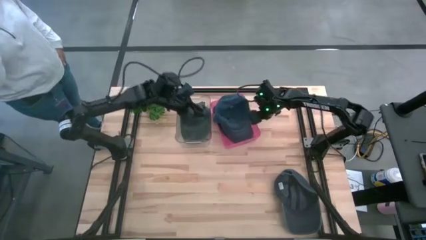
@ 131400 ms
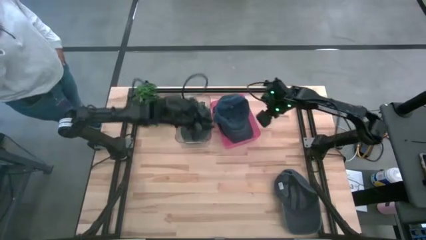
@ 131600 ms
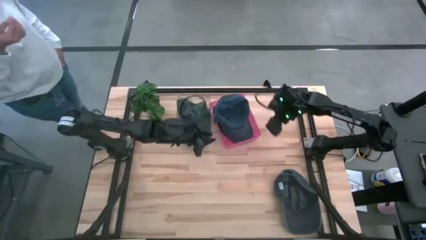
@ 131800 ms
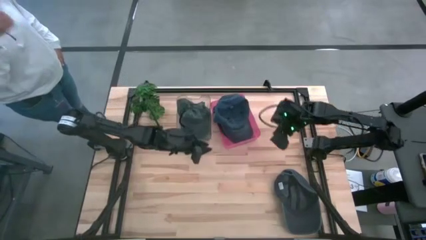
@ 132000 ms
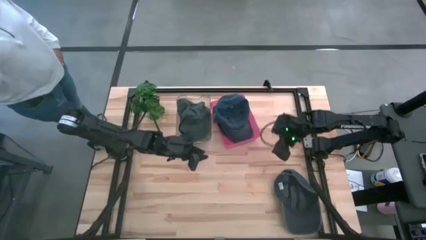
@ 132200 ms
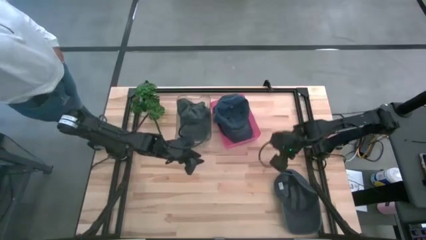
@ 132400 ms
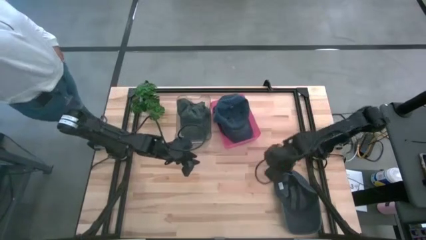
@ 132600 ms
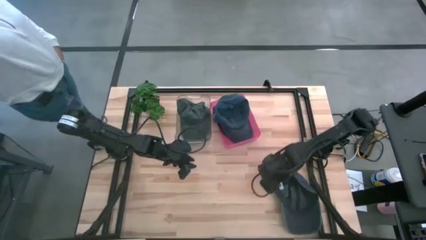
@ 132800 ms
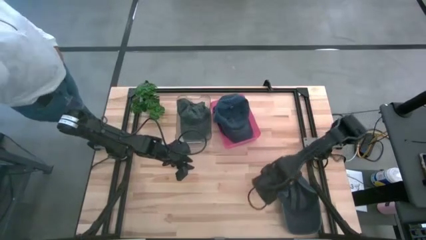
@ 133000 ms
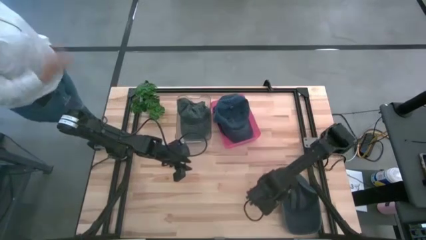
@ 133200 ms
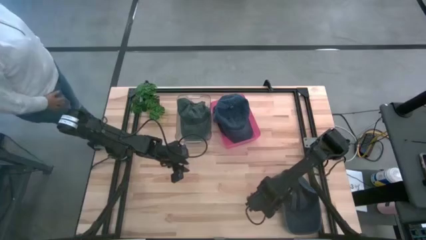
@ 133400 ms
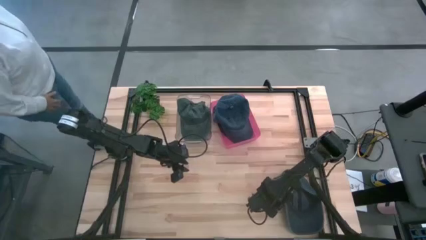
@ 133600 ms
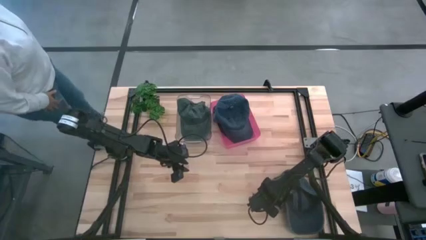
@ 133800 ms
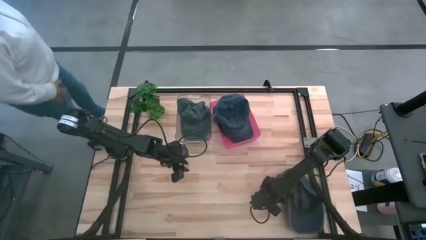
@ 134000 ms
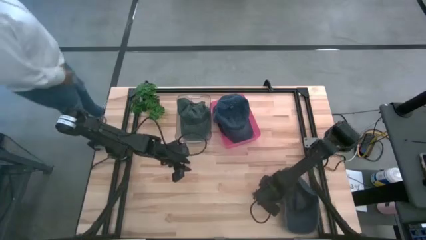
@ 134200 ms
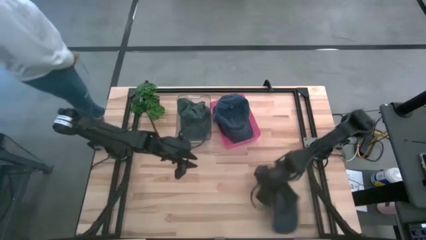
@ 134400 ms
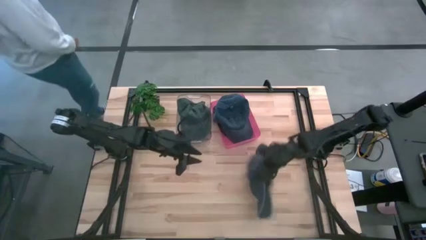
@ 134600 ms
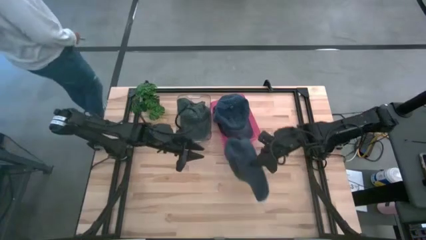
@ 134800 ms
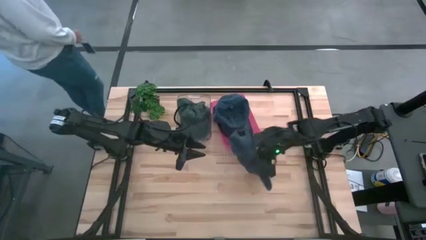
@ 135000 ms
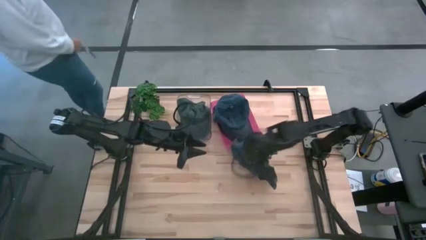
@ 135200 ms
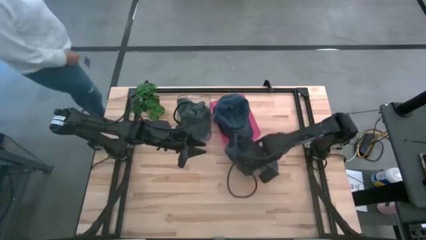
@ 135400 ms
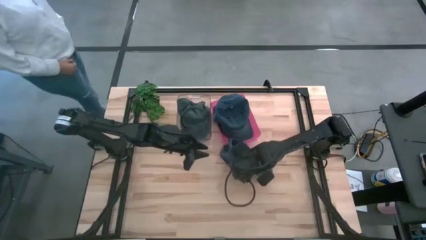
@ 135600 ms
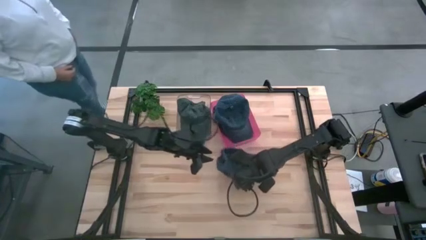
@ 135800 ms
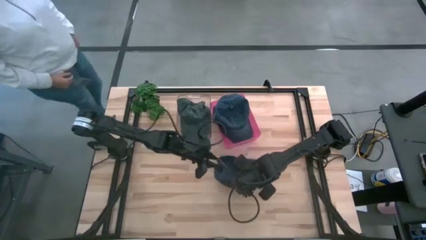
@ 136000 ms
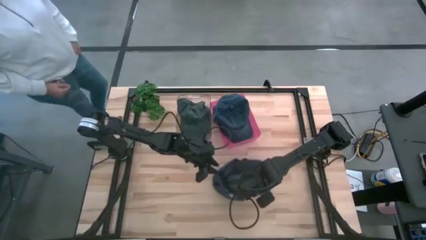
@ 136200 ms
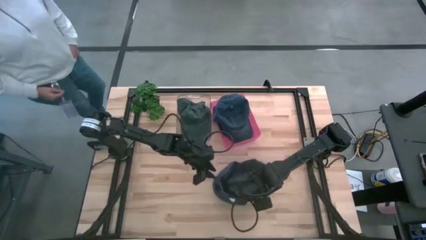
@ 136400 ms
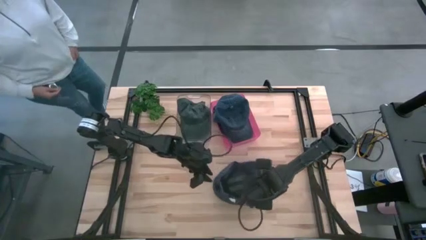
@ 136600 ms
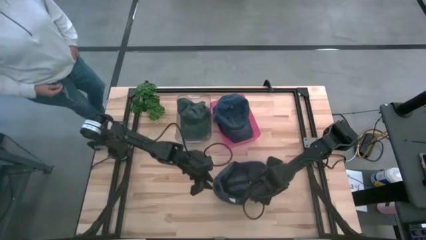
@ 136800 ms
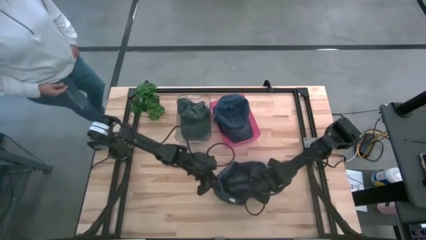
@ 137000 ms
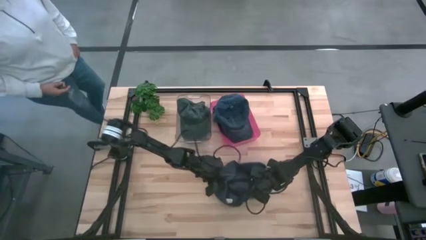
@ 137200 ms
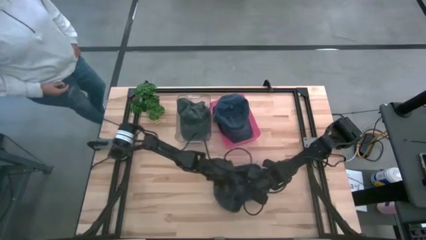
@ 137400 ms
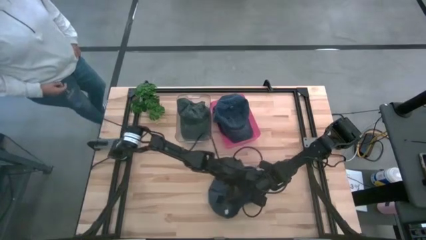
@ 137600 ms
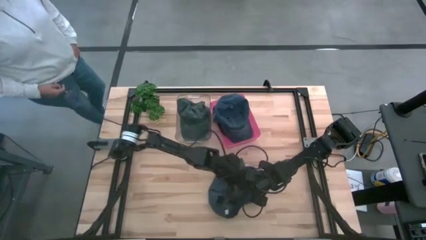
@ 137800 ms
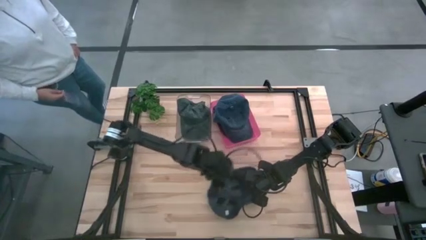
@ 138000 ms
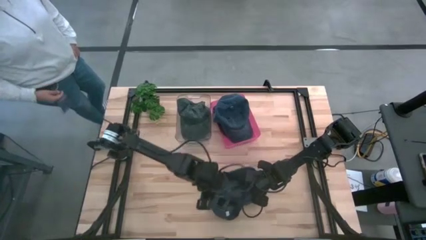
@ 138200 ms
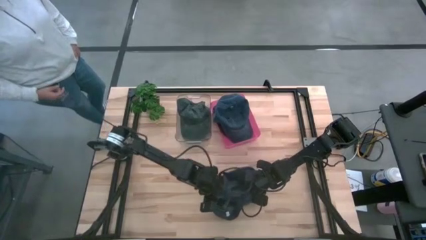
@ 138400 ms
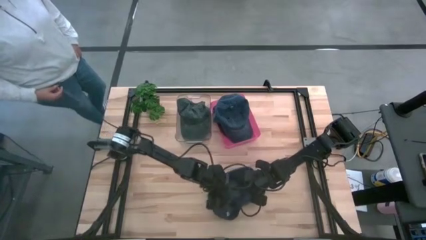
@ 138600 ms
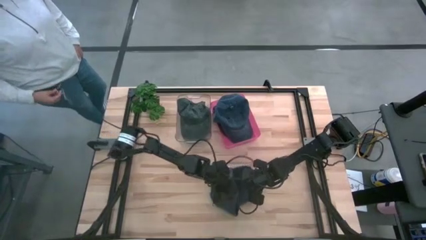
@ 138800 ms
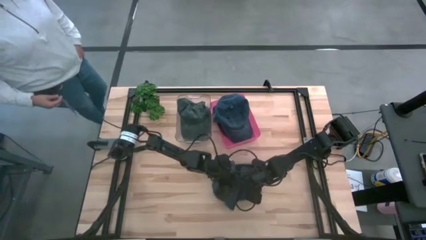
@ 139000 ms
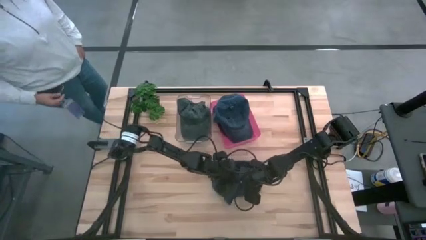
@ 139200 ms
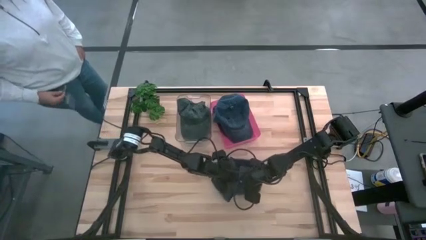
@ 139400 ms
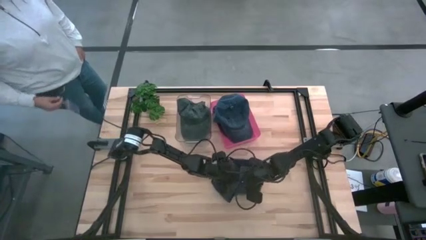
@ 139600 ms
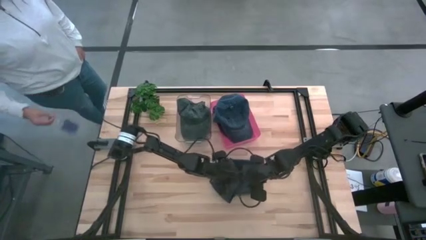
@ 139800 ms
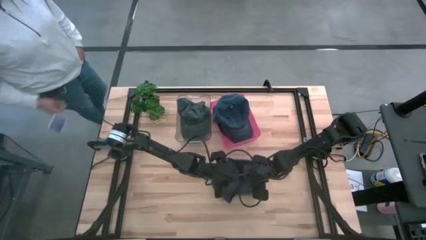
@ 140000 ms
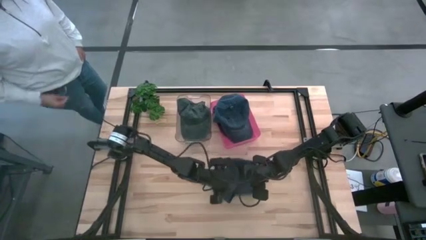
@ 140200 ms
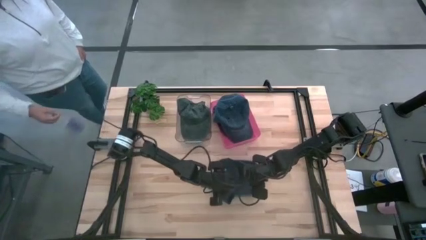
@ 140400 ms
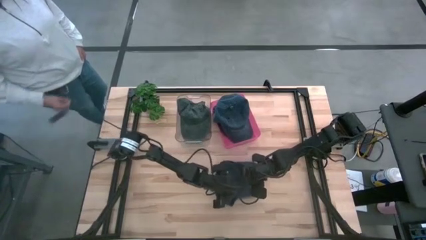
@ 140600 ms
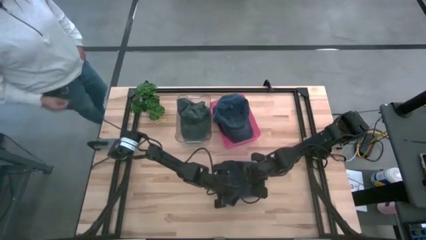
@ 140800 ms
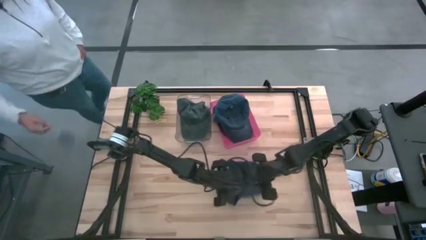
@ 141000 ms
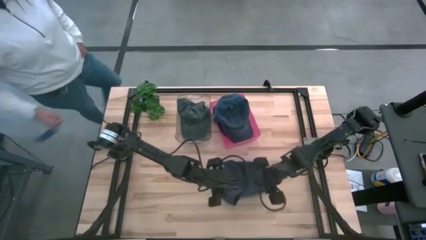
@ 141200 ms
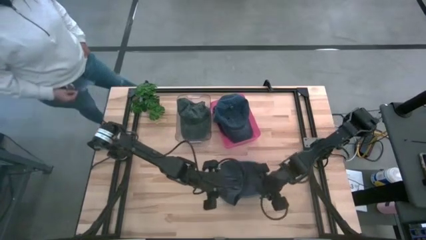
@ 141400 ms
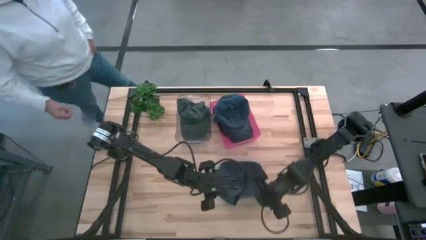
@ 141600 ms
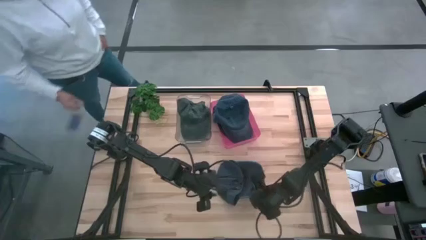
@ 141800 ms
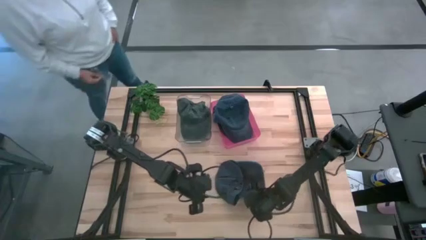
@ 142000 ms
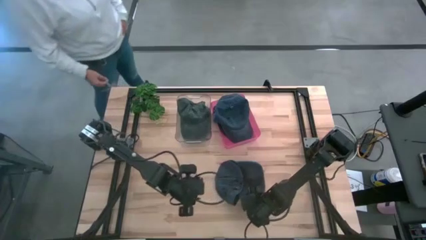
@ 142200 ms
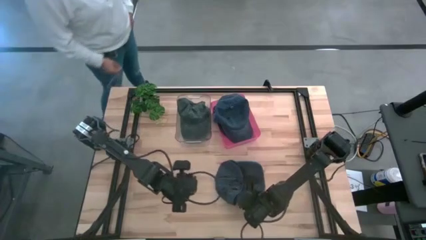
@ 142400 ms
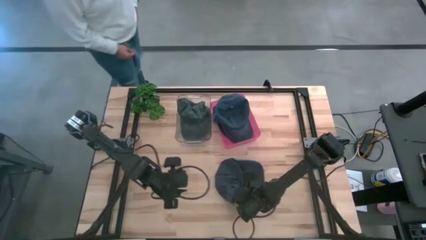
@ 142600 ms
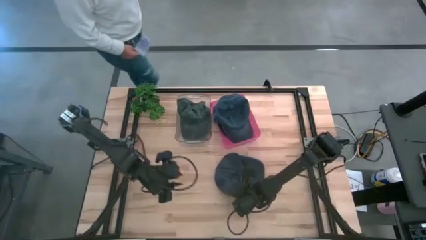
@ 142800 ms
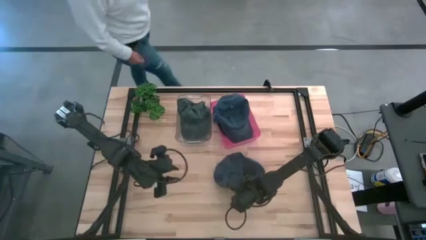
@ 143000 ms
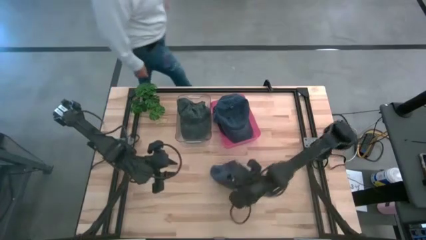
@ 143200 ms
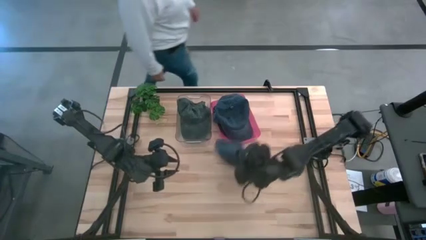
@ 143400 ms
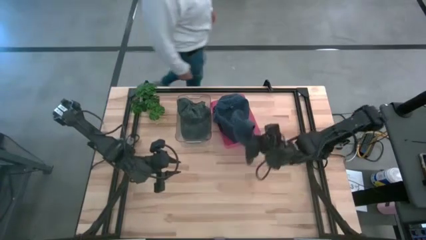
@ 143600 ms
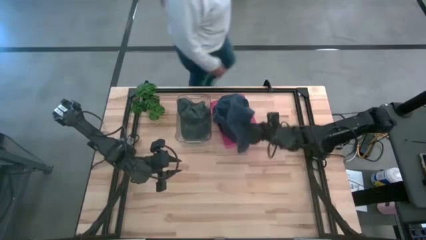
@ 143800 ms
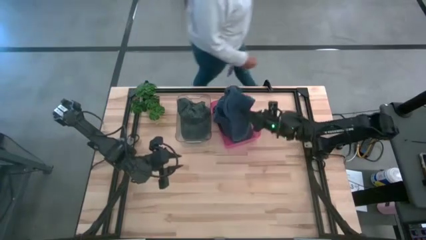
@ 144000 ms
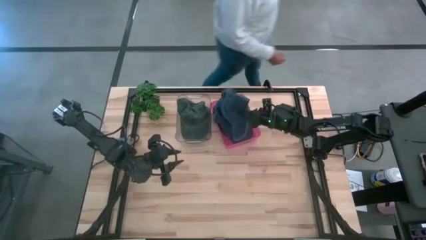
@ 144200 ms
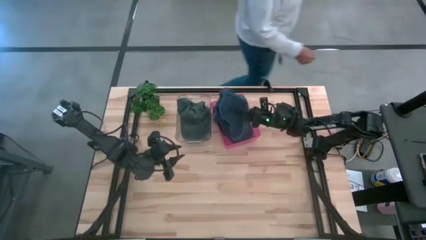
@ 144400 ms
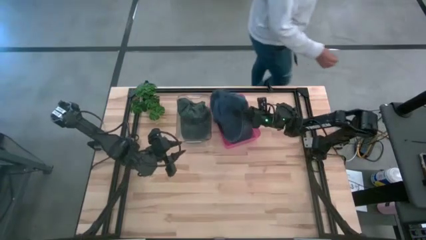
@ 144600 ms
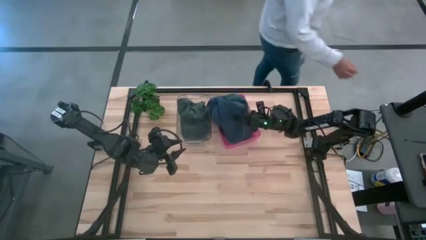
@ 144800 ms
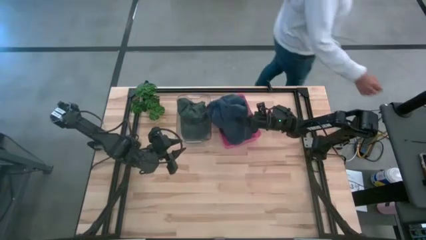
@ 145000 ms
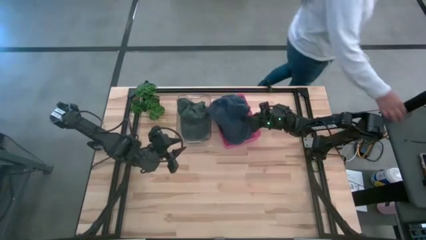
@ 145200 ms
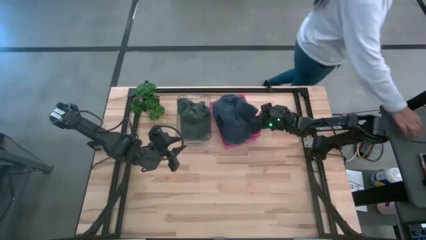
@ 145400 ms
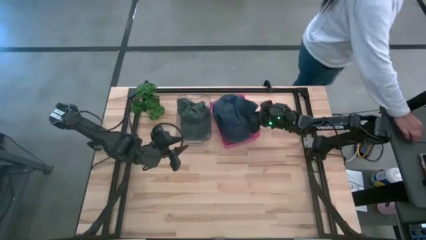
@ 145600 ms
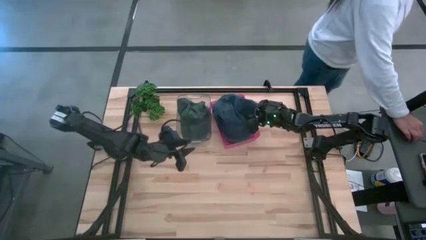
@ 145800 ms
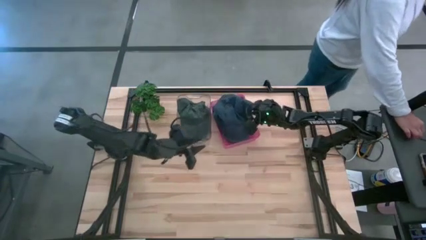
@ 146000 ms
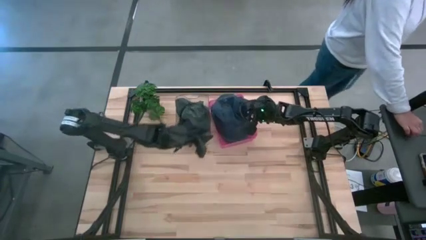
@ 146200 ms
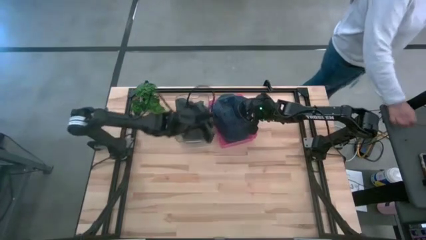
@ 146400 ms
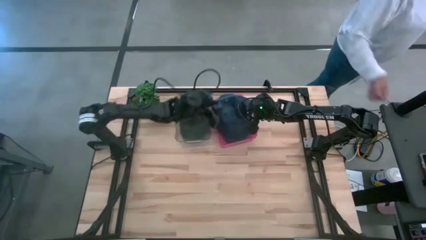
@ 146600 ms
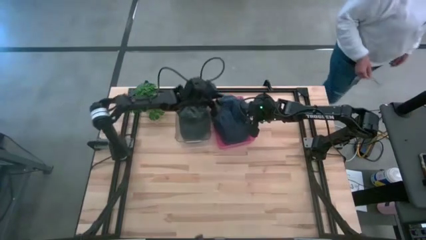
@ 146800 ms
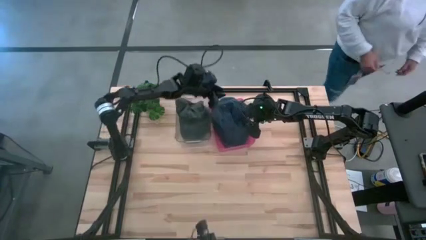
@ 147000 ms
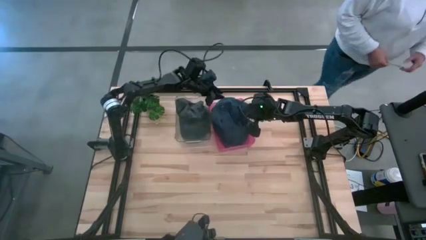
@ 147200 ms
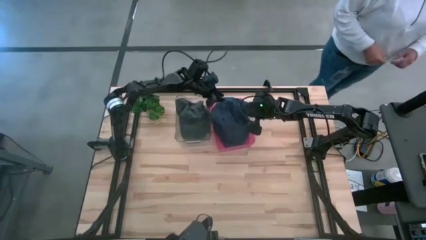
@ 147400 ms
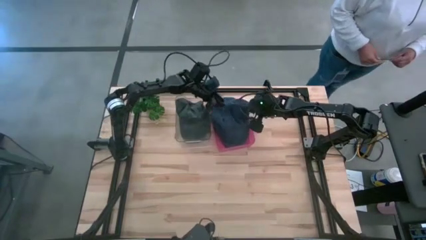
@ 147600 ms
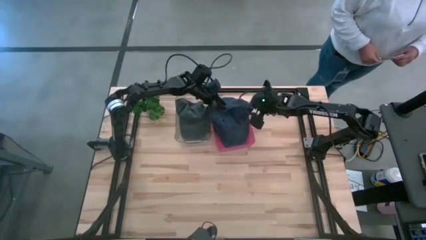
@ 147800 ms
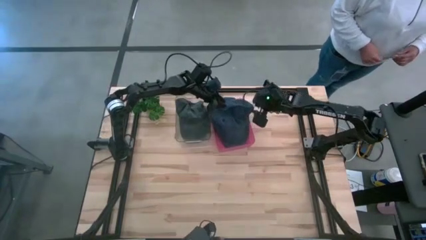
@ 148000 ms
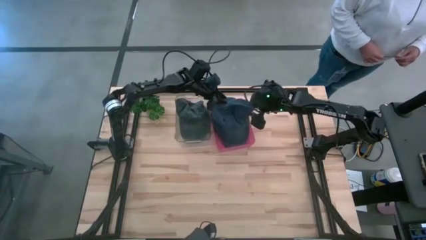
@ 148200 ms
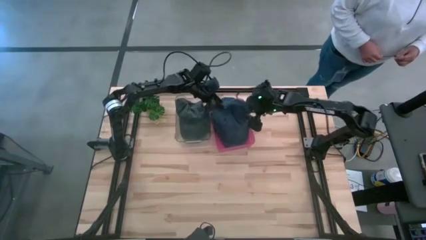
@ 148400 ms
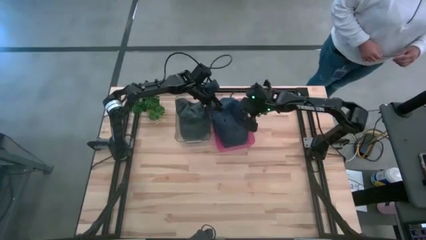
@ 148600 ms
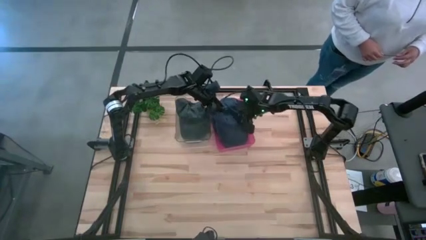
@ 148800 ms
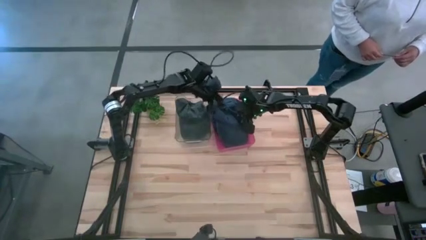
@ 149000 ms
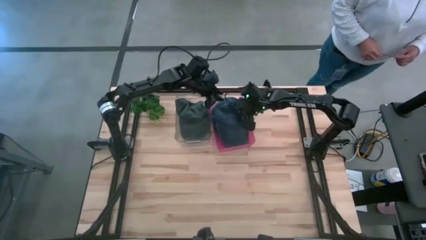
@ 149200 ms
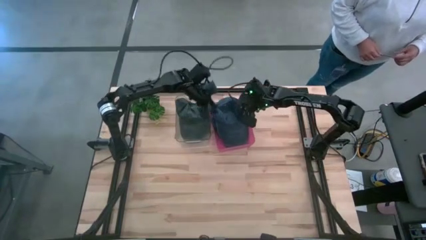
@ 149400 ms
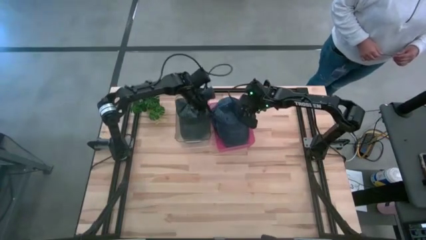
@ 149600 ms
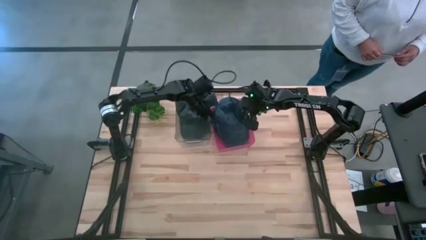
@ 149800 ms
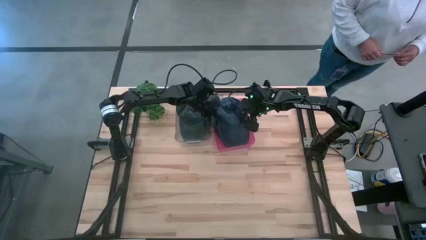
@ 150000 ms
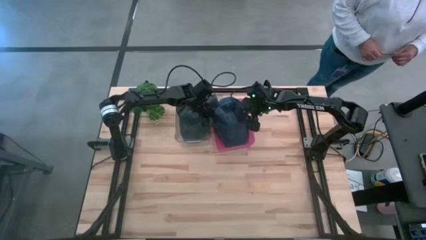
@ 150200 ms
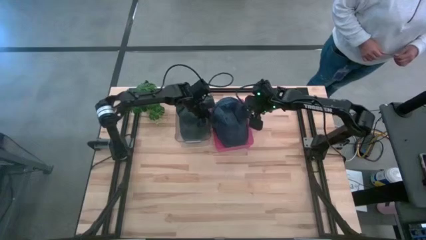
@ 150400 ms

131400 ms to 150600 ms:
Task: Pick & Place hat
Put the blue cap into the red bin
